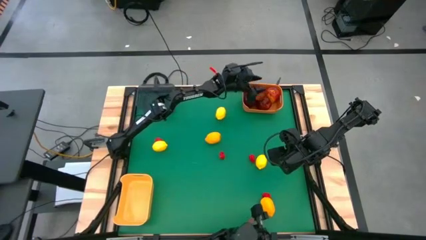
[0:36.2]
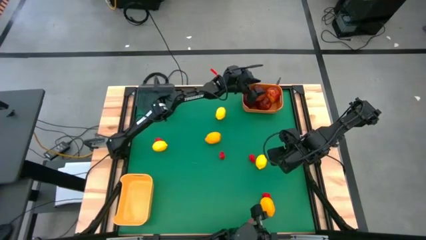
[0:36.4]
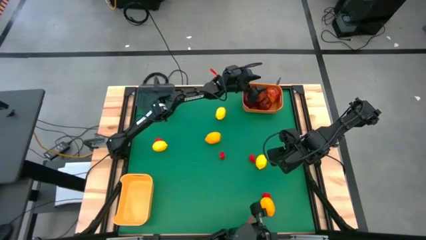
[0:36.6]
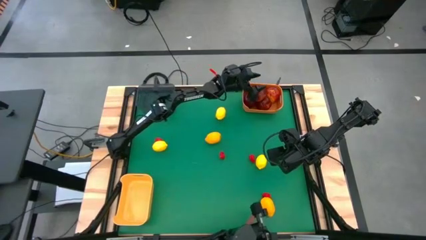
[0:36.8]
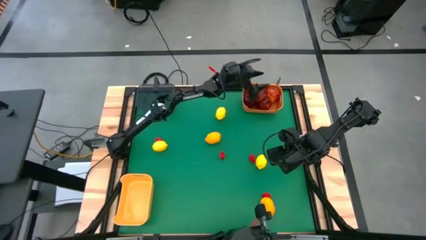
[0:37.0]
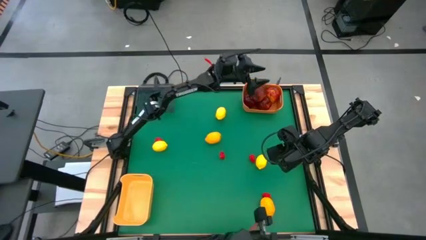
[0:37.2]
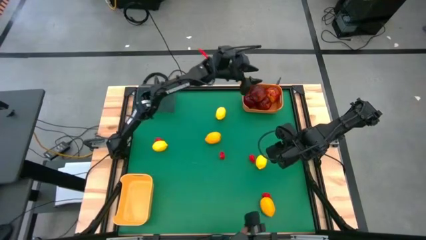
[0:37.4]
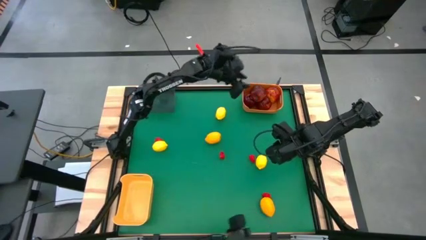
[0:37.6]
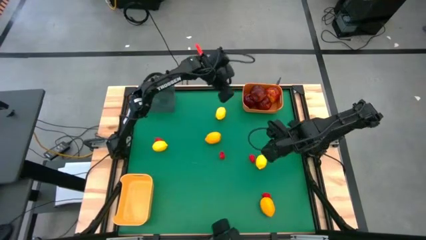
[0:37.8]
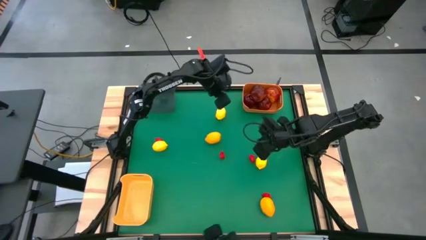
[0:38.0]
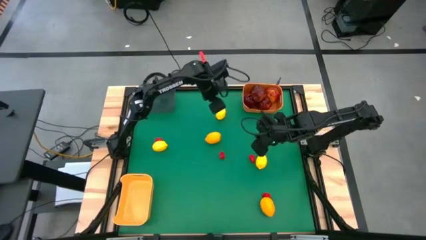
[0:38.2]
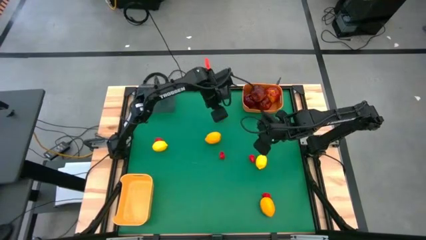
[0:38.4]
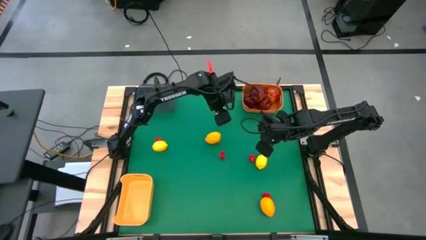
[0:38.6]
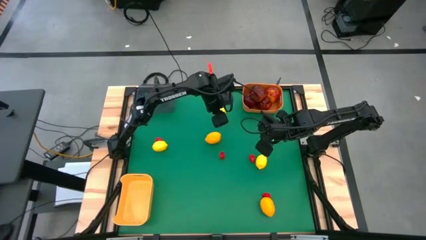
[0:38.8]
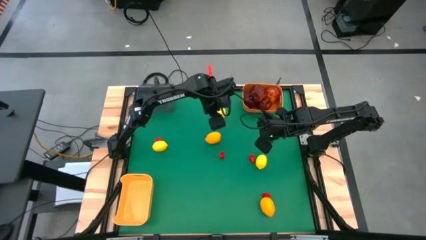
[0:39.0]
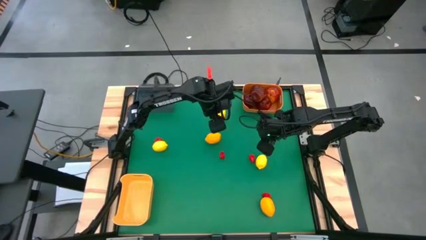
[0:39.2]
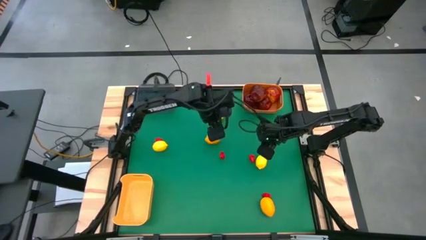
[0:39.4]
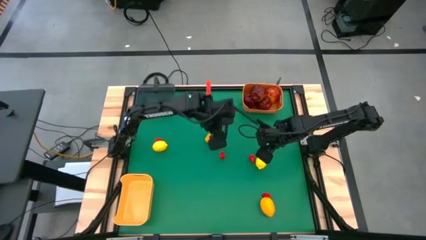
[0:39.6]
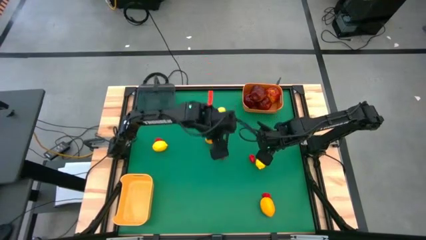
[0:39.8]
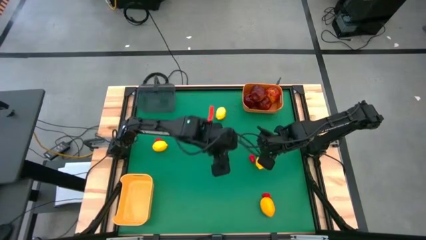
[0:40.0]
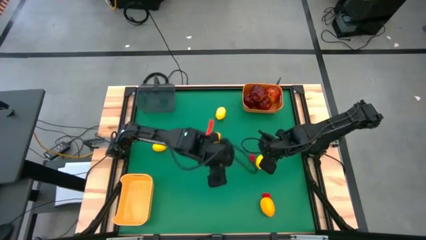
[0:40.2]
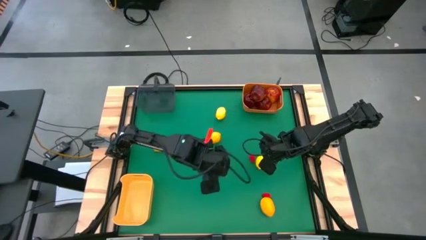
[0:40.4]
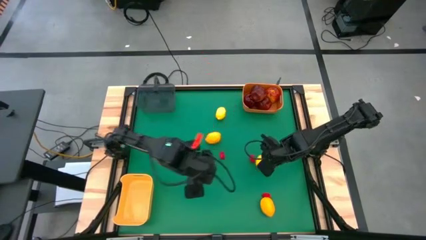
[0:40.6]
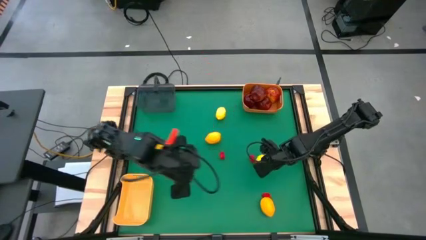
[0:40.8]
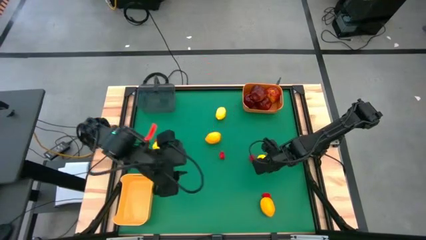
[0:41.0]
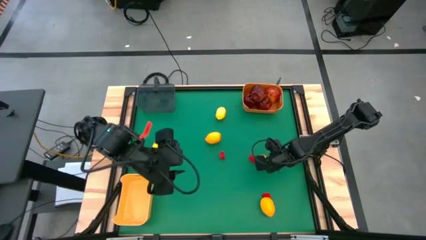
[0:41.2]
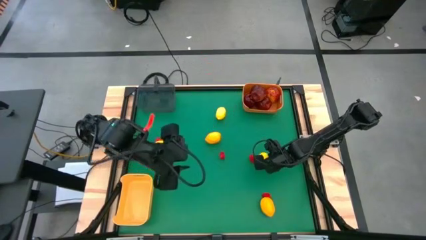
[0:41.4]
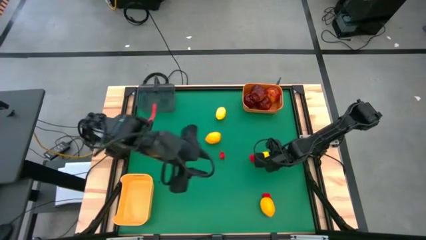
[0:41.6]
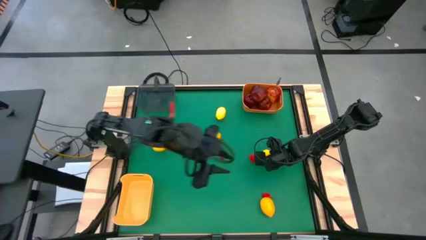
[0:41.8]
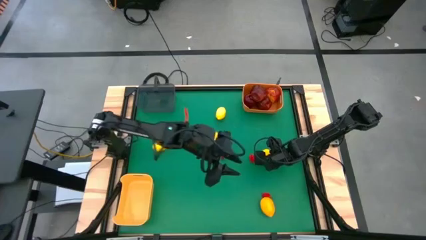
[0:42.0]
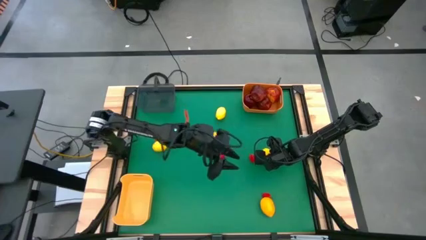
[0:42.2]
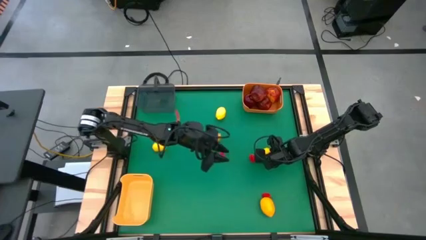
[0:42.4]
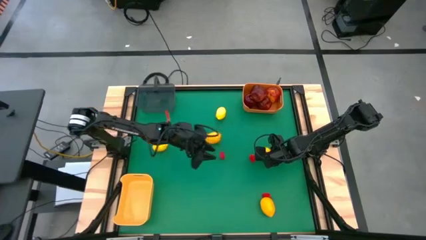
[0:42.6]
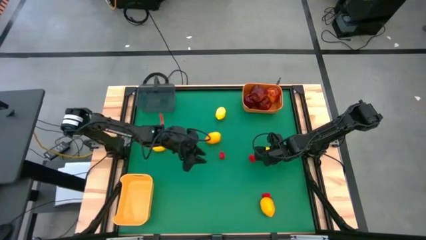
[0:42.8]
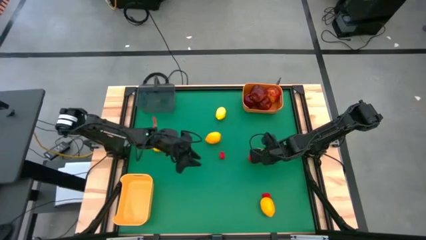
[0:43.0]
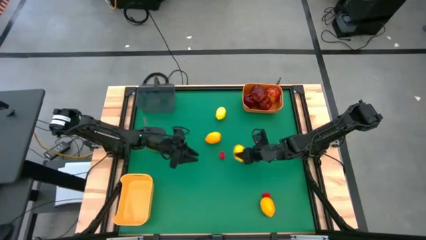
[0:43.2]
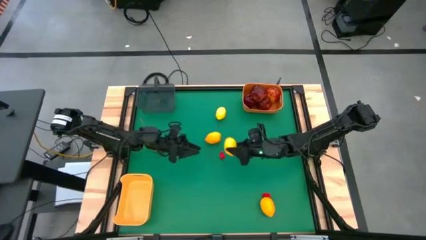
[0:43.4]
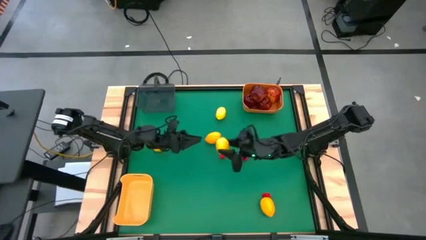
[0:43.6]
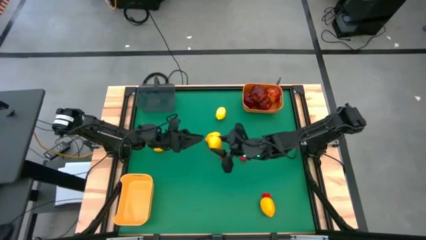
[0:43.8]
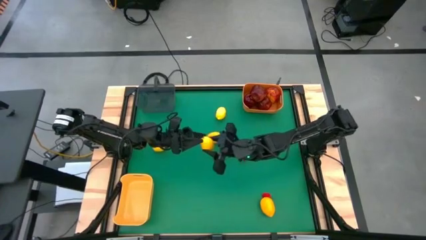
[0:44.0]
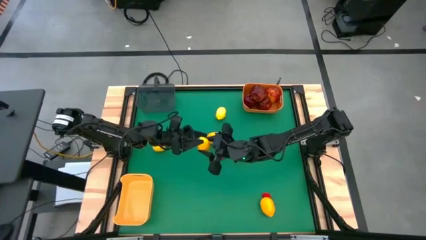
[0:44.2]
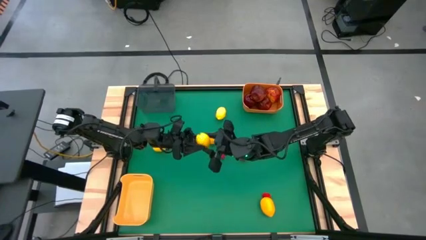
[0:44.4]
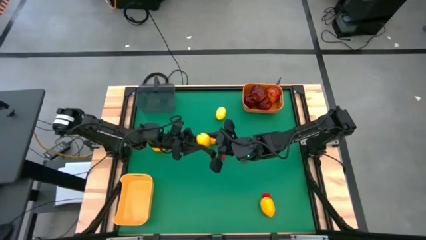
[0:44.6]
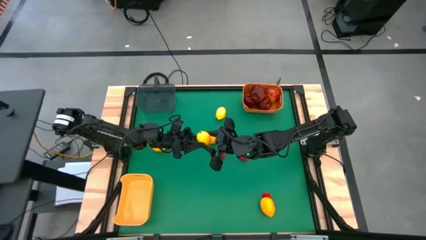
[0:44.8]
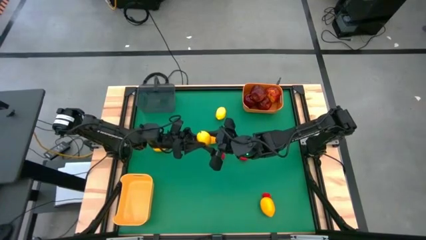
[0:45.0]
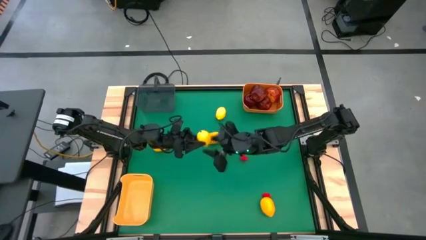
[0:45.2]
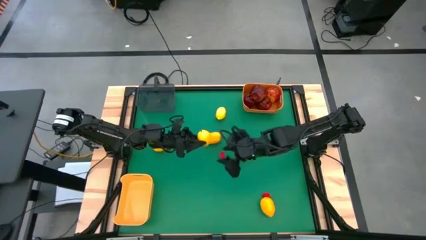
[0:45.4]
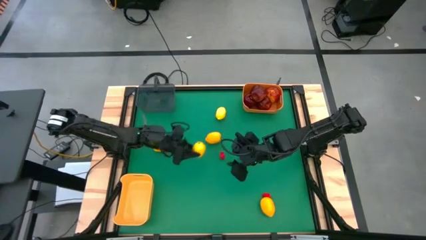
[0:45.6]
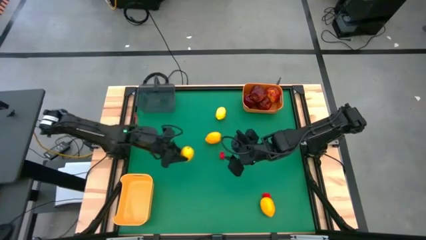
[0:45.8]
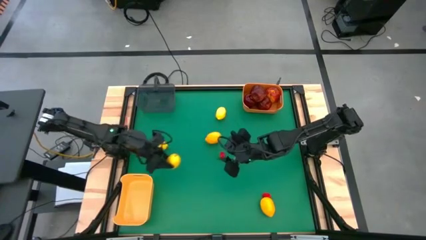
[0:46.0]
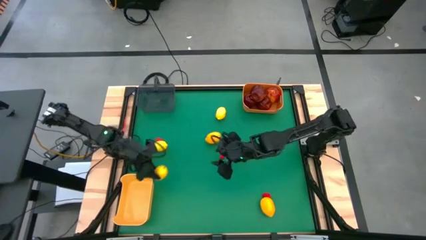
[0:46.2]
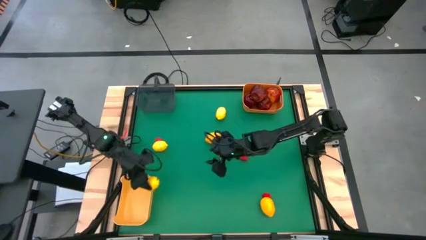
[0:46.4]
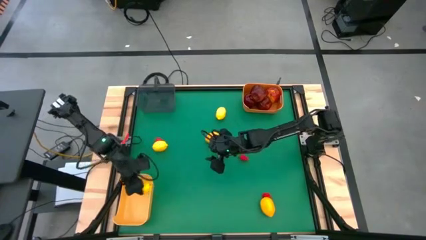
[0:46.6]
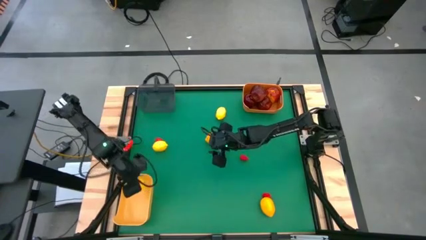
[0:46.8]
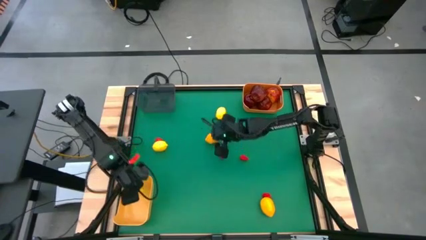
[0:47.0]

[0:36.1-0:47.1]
Task: Sort produce into baskets
Put the lemon into the yellow bin

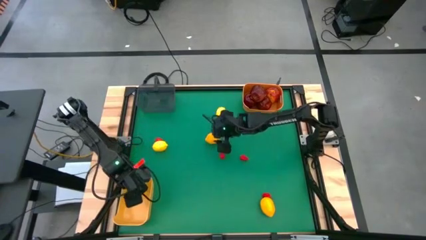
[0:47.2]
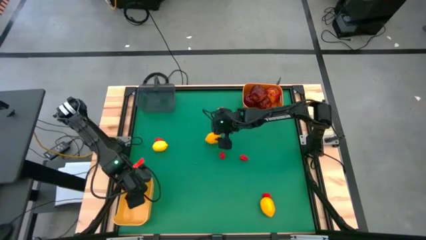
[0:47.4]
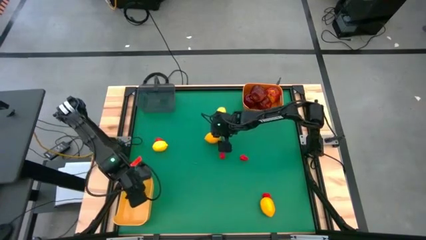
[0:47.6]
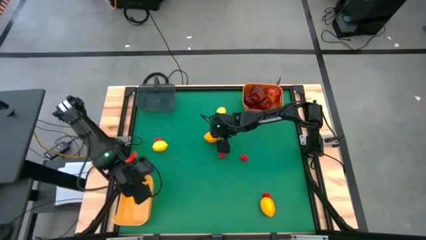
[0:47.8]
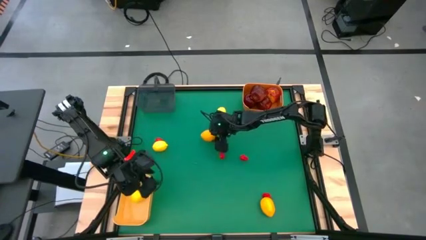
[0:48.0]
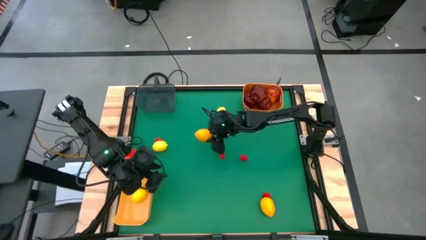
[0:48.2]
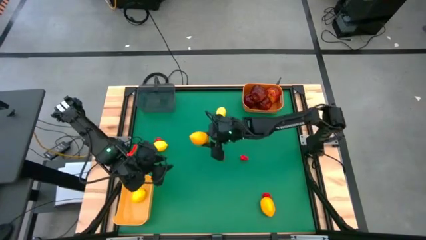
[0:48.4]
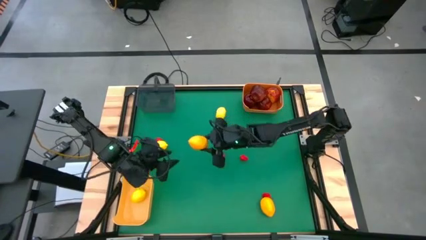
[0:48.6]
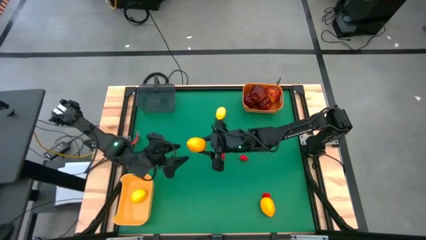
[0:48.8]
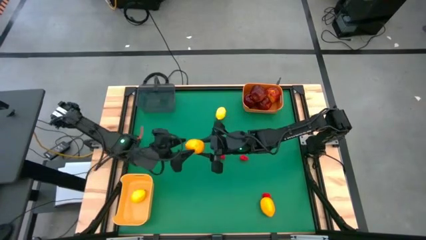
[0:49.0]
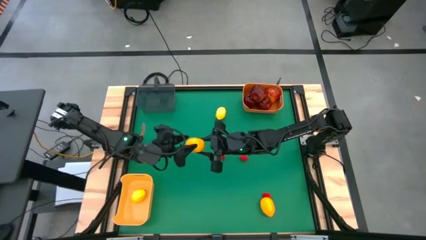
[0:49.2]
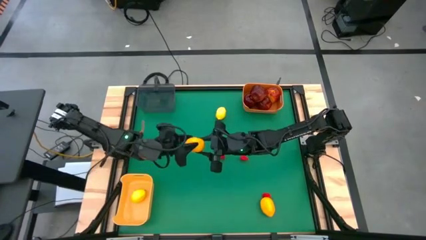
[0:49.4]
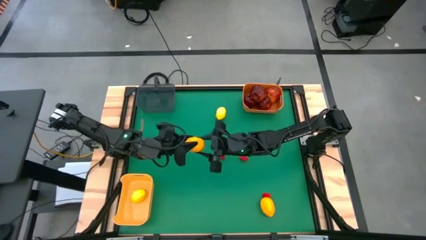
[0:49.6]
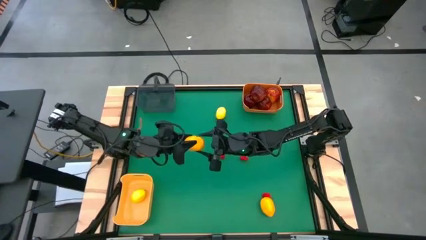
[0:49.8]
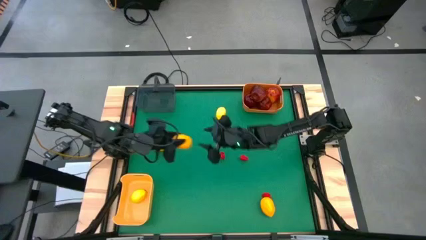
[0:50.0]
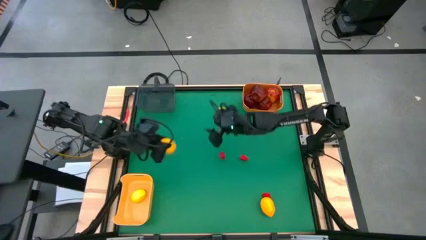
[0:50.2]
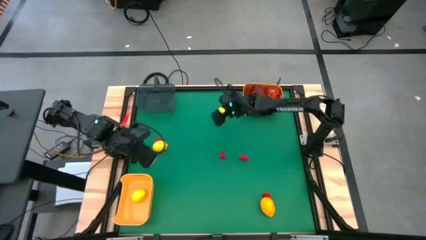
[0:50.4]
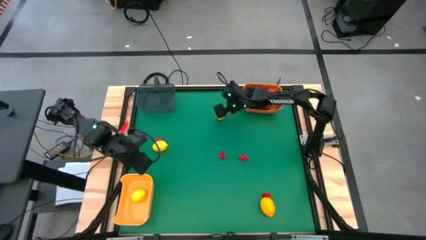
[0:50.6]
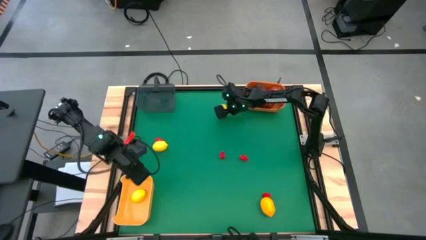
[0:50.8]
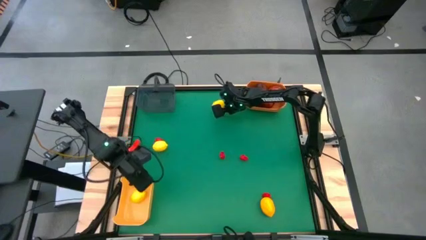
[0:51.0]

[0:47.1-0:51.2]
Put the lemon into the yellow bin

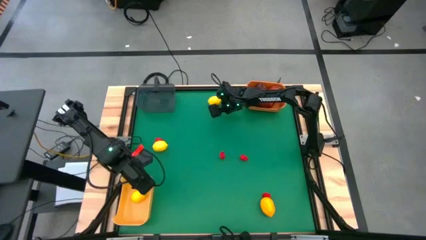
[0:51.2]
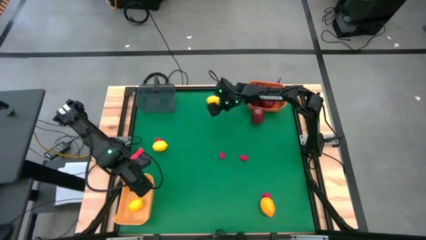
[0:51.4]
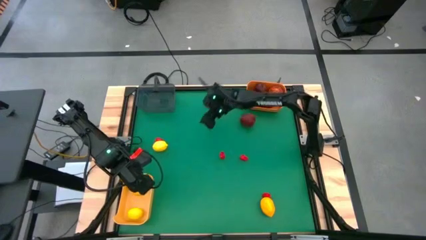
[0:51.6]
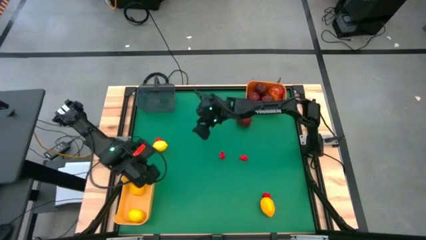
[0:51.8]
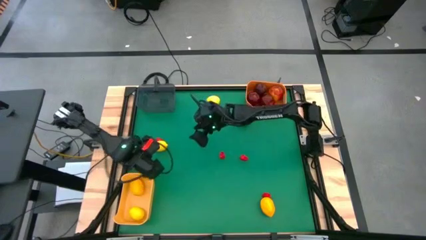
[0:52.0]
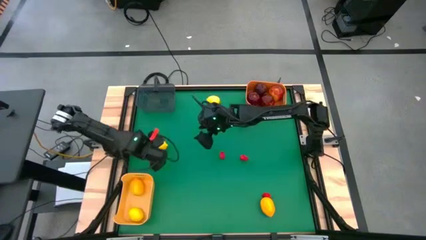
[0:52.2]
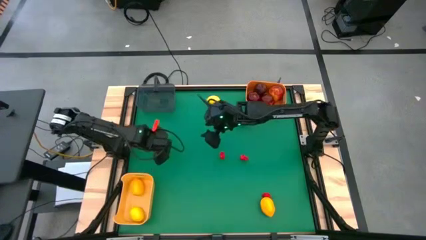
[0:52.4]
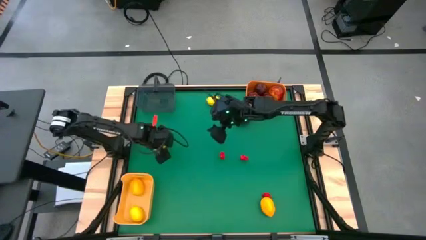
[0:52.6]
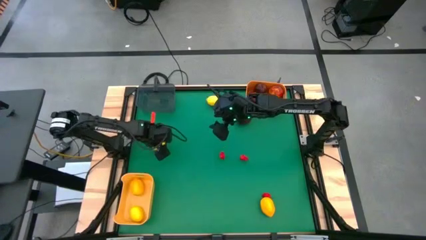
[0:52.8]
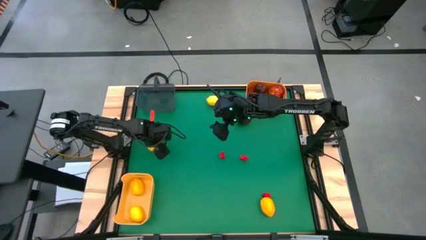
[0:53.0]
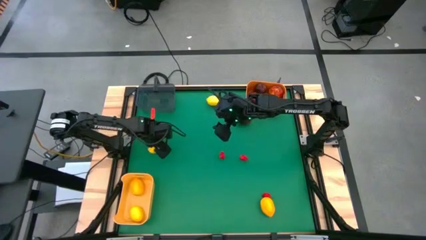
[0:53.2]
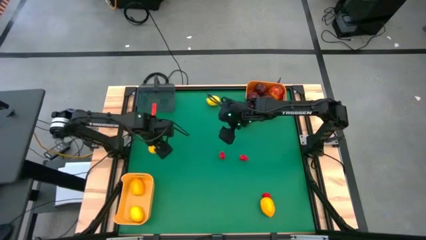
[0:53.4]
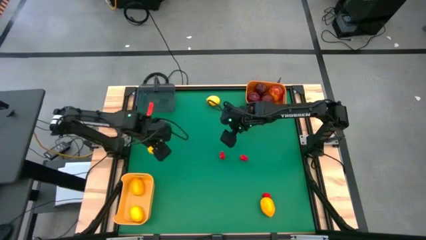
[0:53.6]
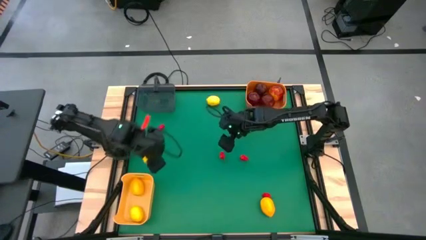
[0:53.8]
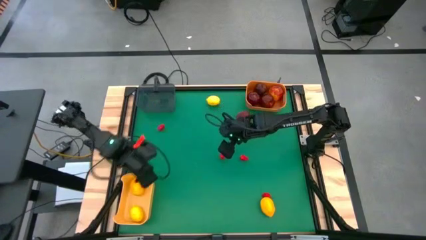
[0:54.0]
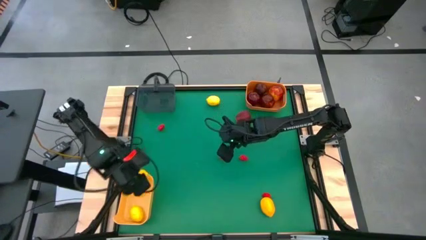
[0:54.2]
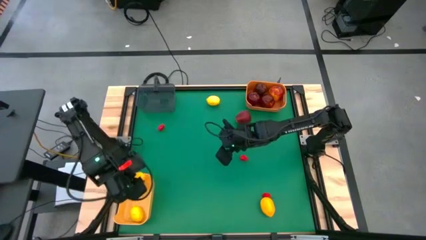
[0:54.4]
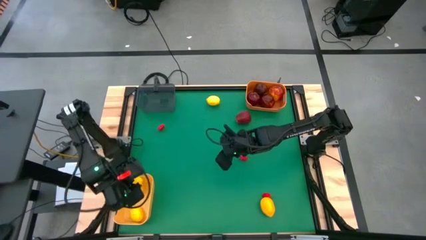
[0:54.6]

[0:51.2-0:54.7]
Put the lemon into the yellow bin
